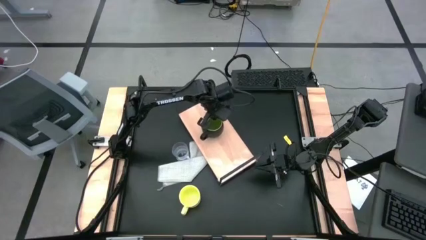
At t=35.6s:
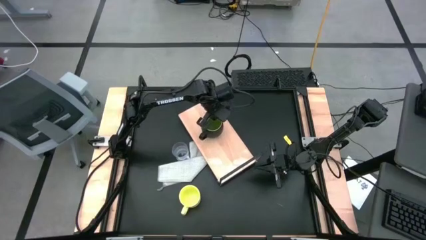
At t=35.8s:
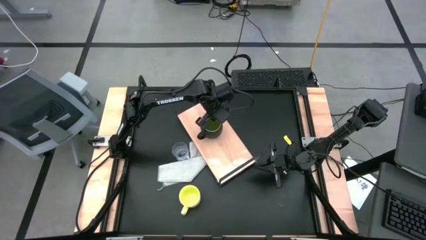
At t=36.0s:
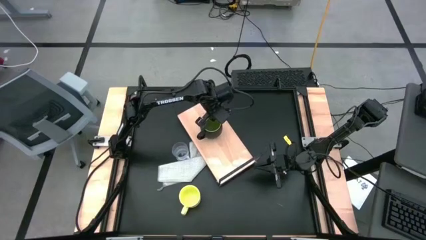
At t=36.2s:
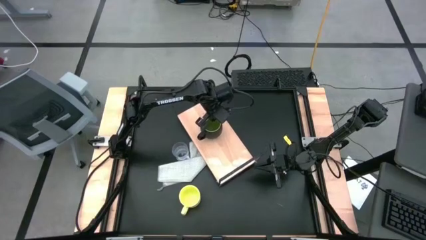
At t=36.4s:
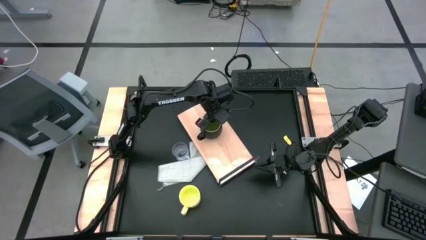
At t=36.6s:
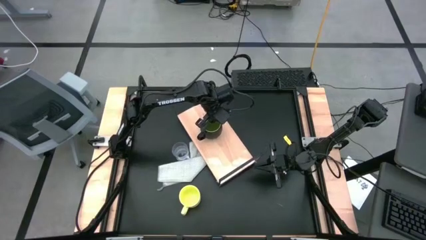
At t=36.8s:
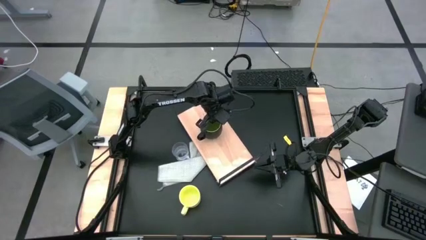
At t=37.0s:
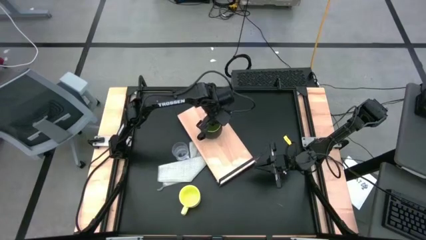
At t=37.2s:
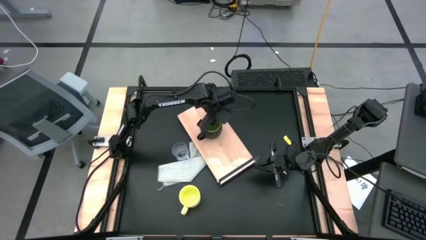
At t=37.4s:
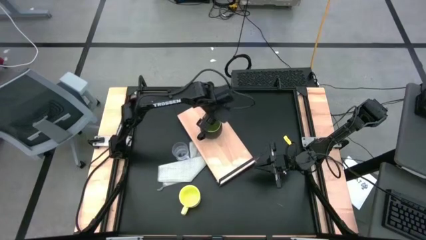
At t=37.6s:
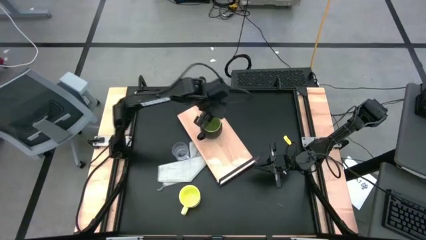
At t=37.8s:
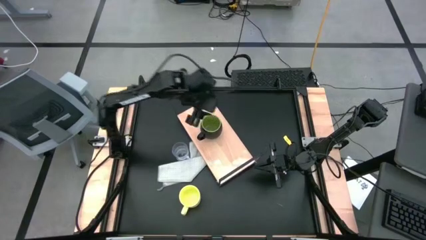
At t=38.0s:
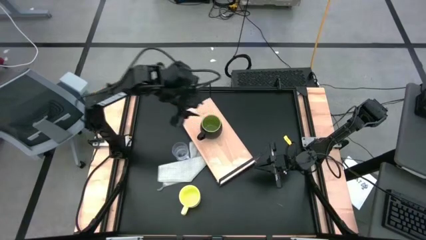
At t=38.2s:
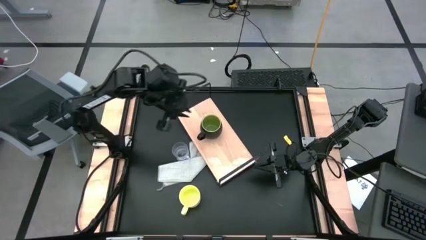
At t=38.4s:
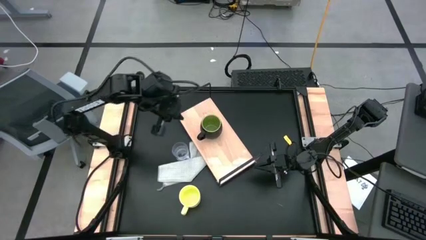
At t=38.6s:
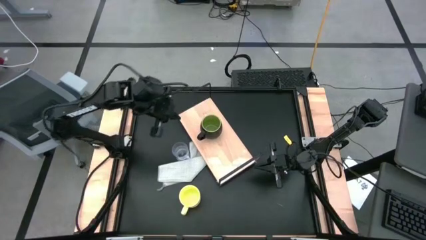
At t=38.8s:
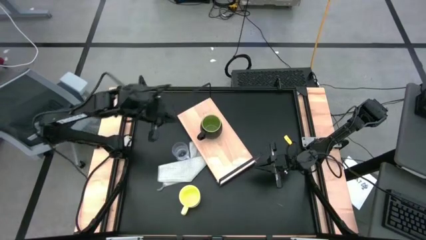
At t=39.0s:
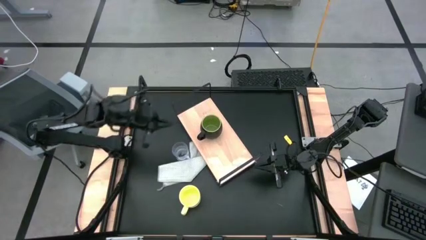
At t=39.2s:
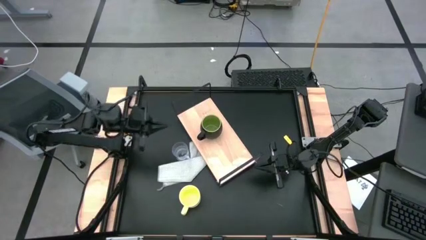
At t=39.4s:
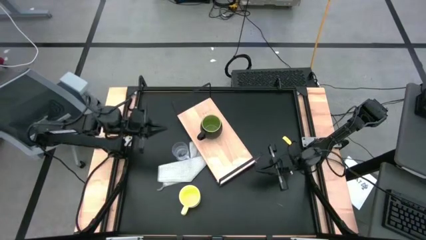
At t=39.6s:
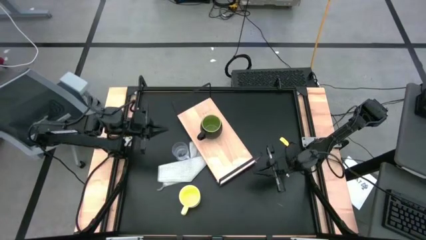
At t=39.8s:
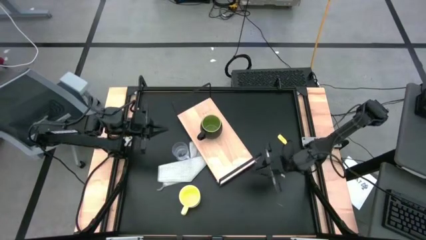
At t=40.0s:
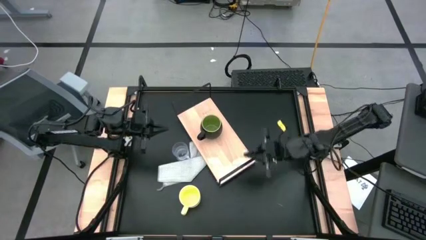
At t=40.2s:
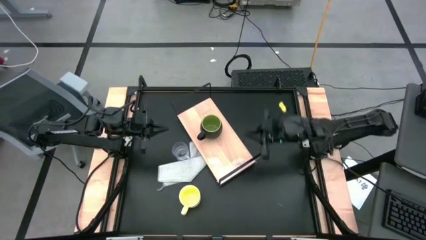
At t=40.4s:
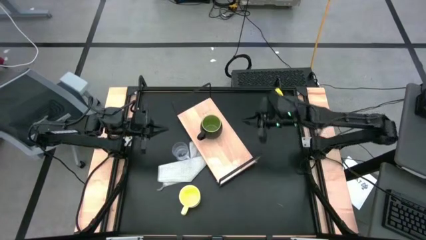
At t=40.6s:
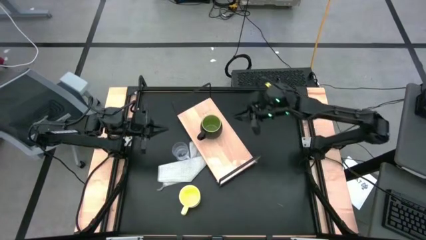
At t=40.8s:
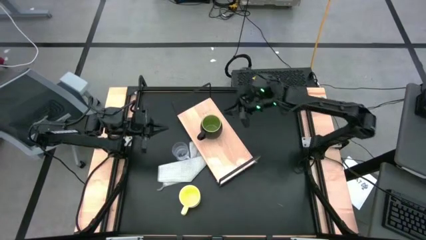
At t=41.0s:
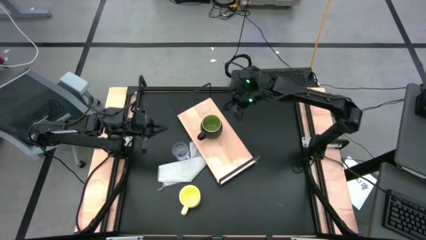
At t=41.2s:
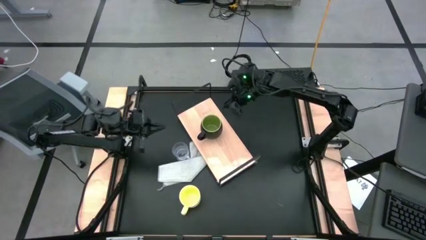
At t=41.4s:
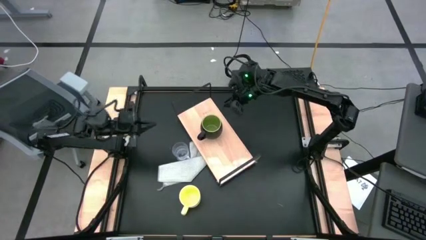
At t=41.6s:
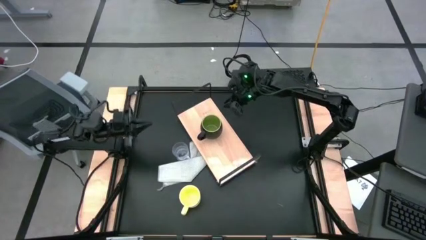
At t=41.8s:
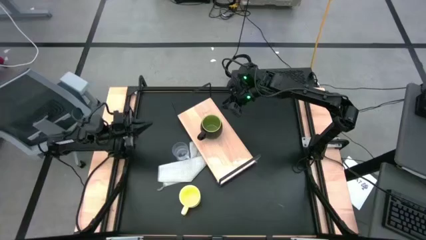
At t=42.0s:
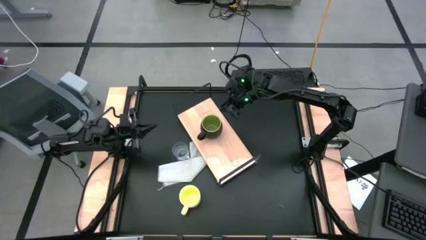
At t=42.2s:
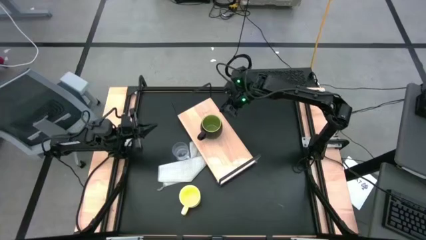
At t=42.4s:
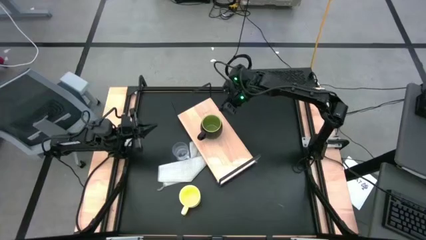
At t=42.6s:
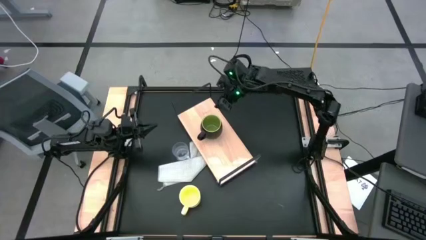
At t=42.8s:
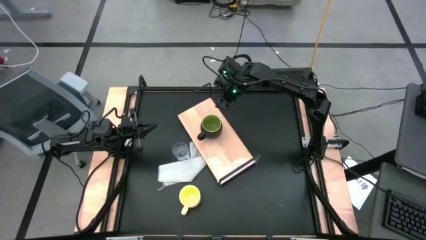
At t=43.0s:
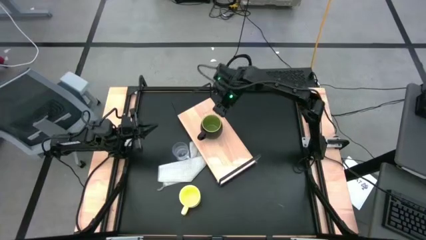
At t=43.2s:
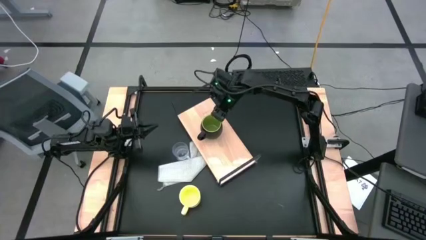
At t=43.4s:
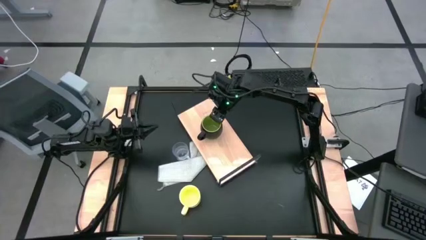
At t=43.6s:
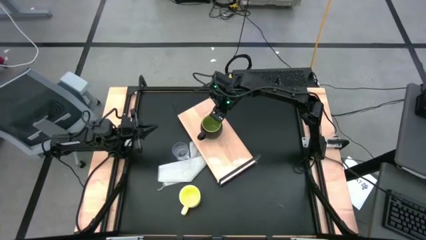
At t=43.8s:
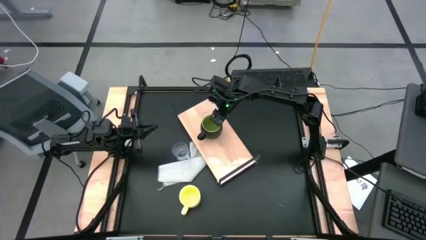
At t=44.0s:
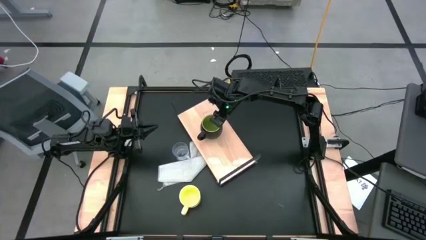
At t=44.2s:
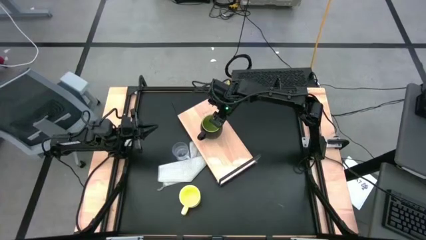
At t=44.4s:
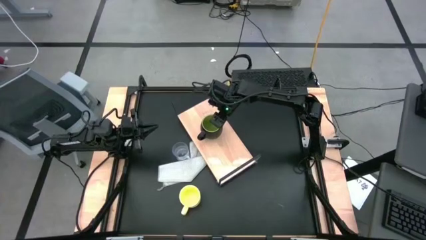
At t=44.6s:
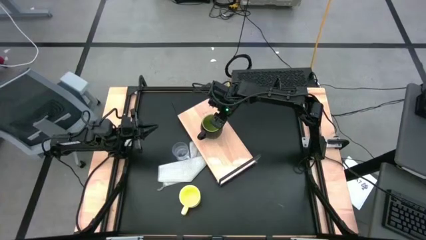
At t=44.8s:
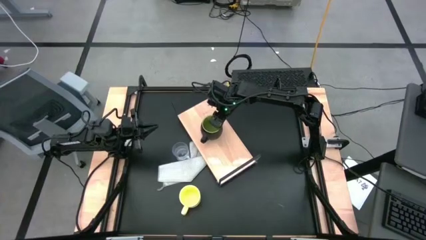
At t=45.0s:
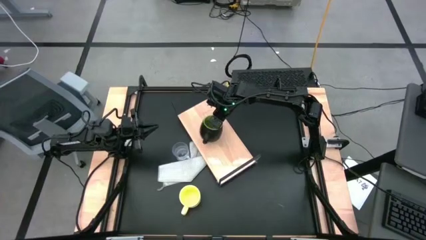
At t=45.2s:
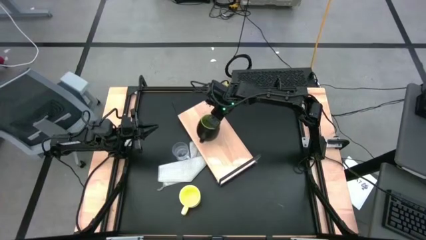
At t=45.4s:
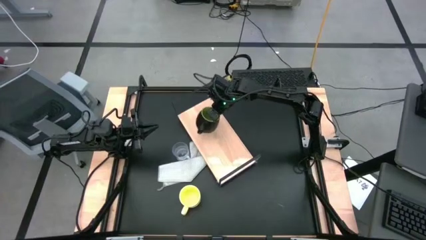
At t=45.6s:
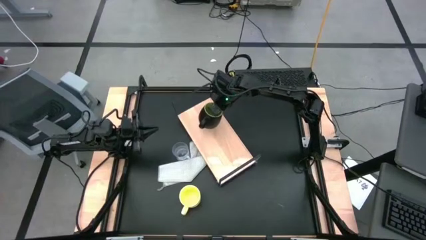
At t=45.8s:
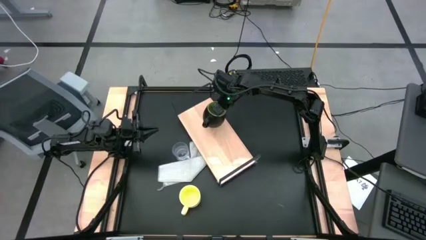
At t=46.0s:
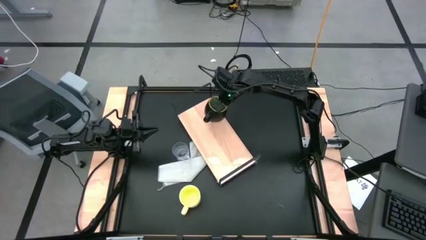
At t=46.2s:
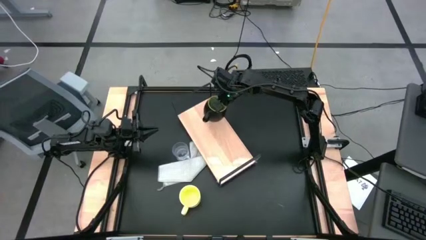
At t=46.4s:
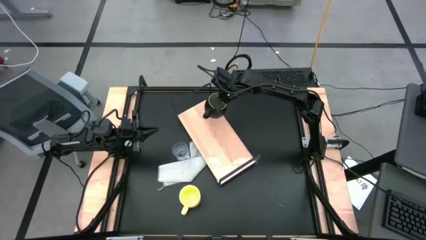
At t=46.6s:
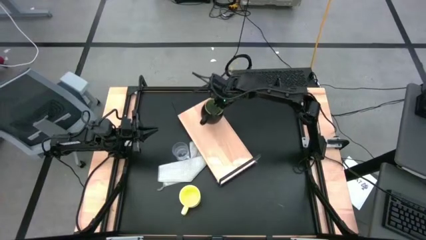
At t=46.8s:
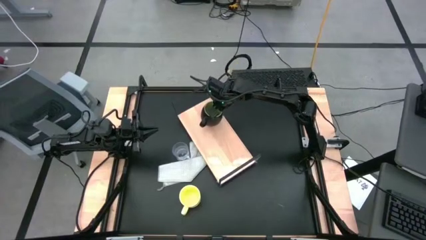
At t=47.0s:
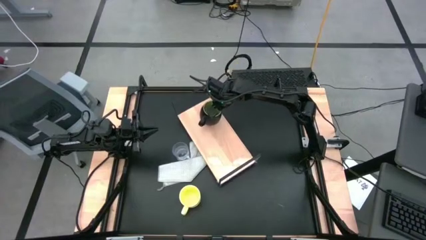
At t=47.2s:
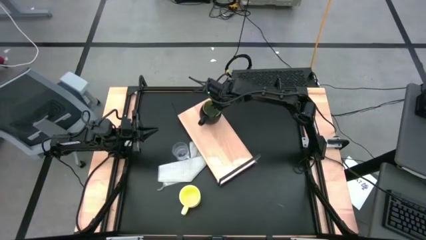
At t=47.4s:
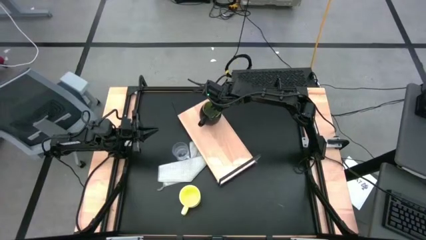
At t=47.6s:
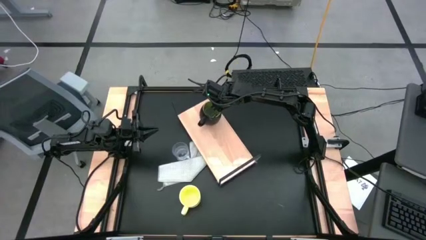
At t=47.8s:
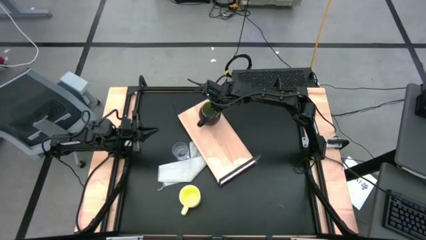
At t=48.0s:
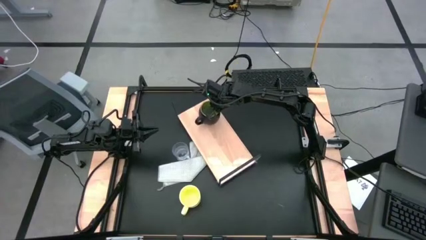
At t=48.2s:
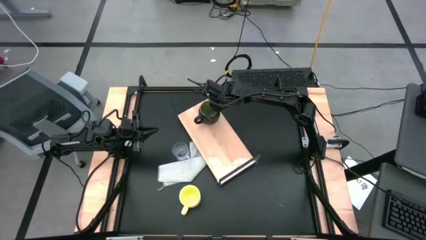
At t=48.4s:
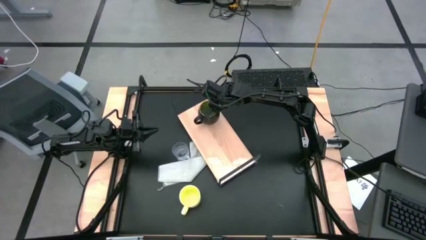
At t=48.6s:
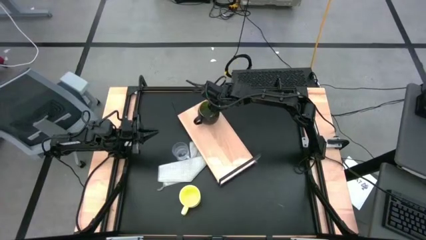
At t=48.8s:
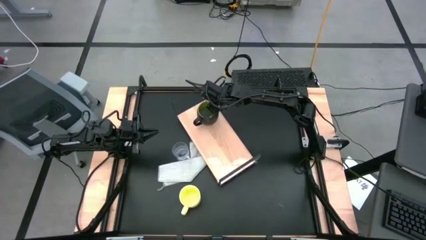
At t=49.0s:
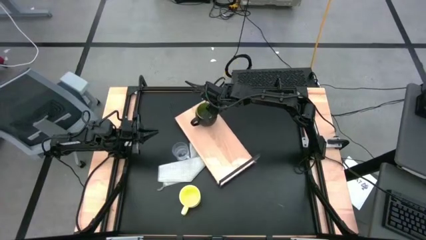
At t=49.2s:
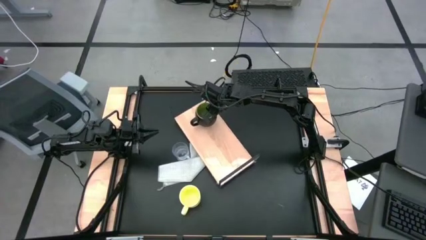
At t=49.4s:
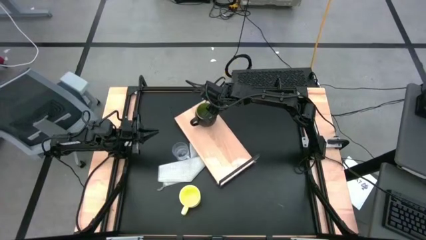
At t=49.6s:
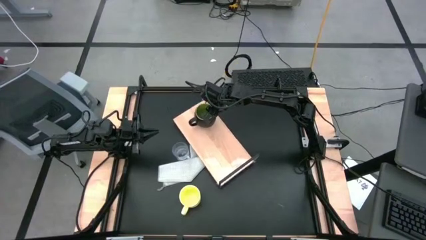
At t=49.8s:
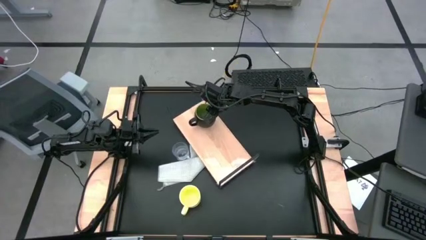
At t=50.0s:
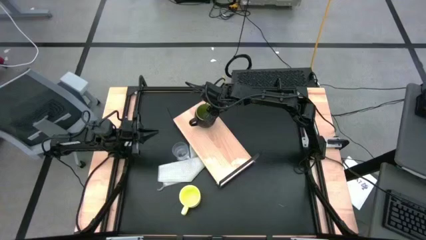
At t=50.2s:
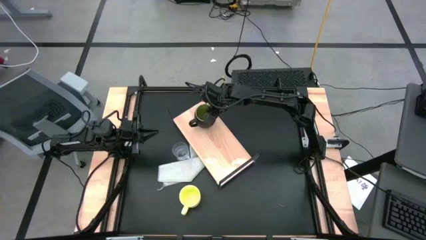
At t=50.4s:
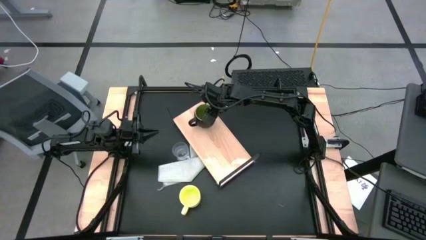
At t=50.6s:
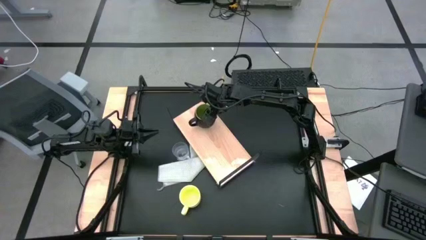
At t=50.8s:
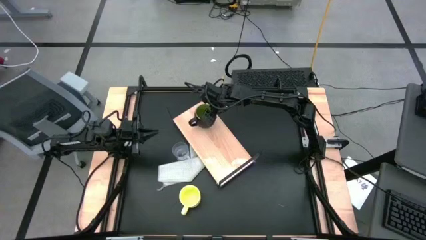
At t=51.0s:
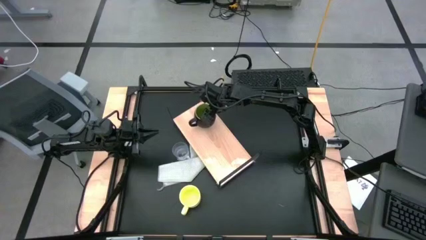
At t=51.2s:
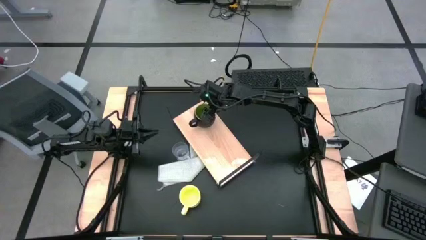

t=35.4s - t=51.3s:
Task: Stack small to large cups/mugs on shelf
Put the black mug on the shelf
